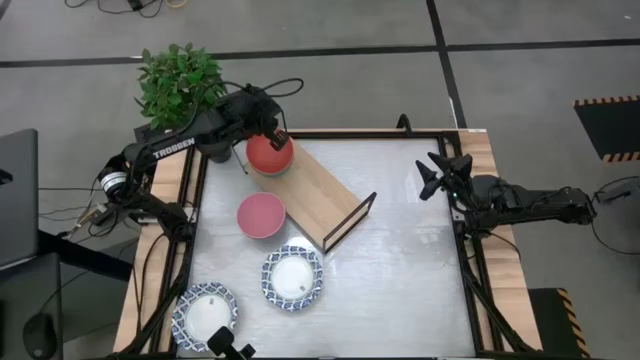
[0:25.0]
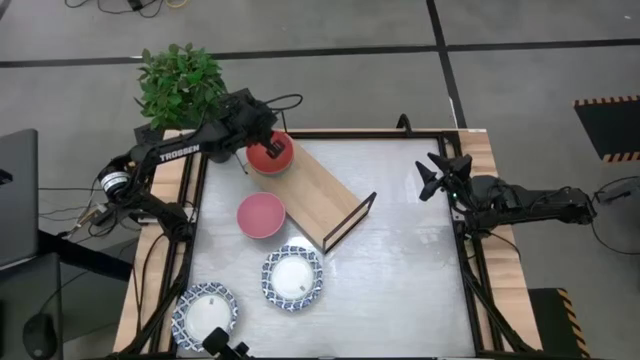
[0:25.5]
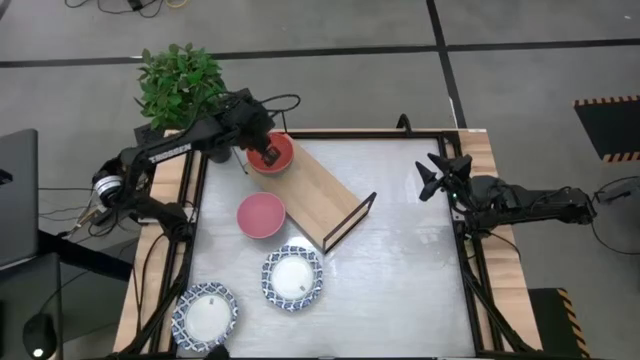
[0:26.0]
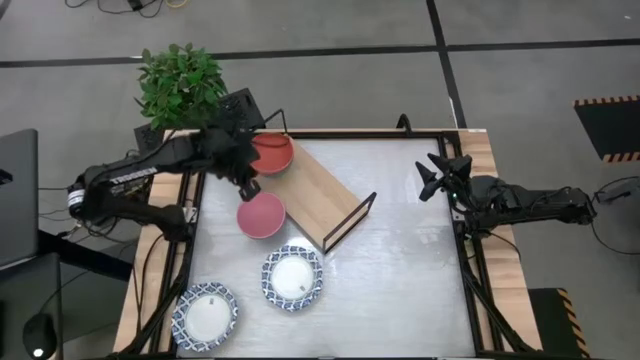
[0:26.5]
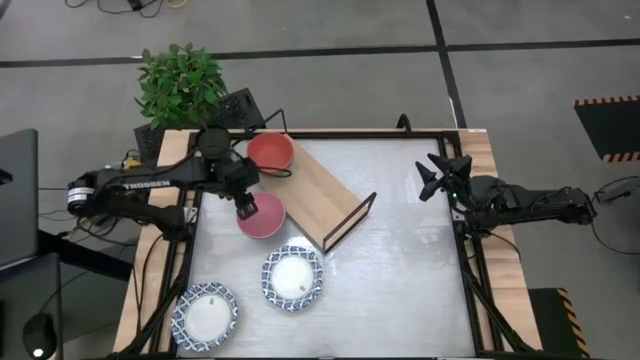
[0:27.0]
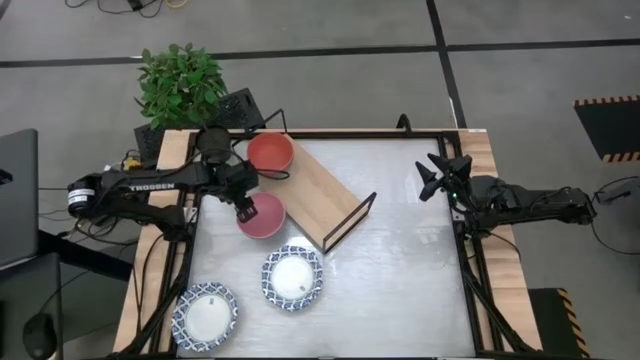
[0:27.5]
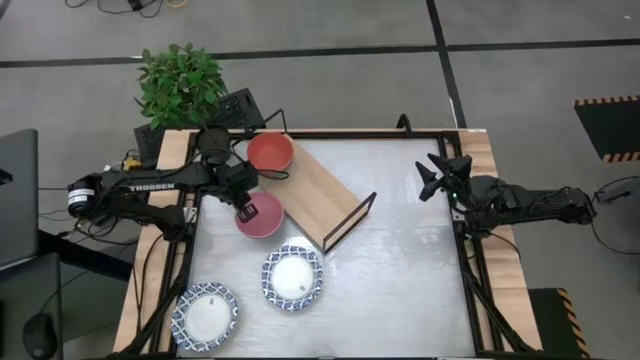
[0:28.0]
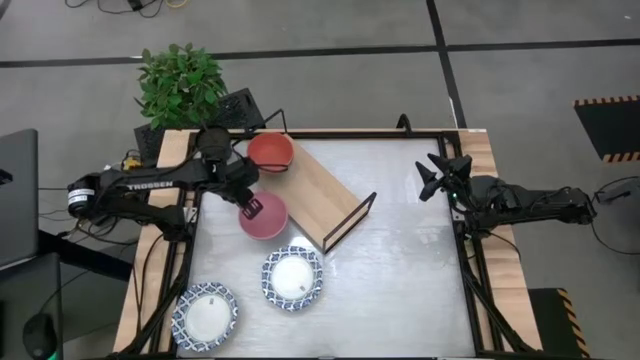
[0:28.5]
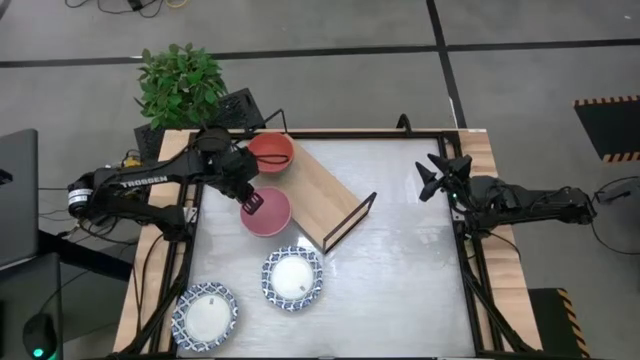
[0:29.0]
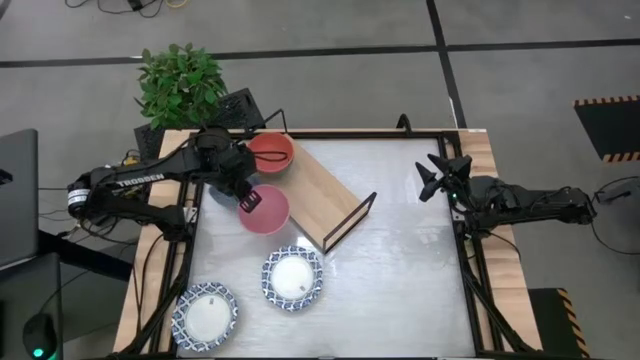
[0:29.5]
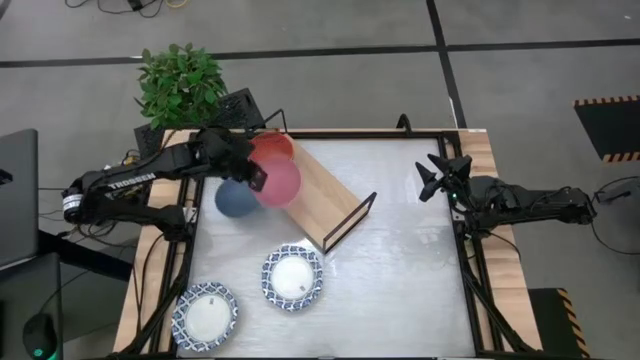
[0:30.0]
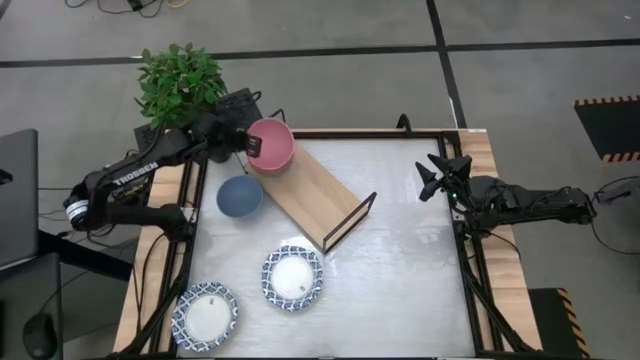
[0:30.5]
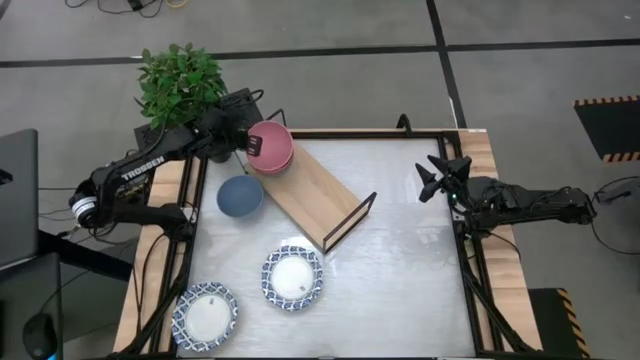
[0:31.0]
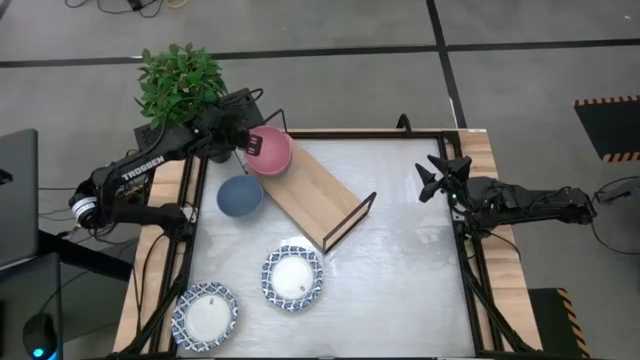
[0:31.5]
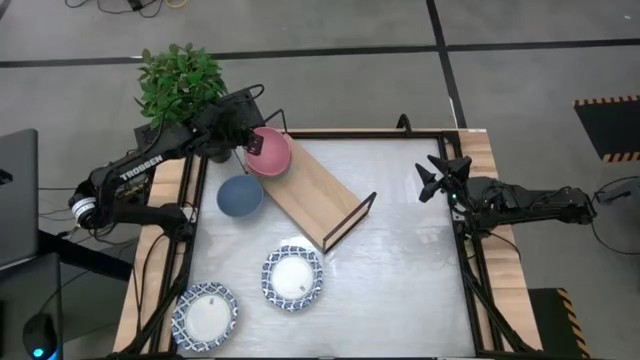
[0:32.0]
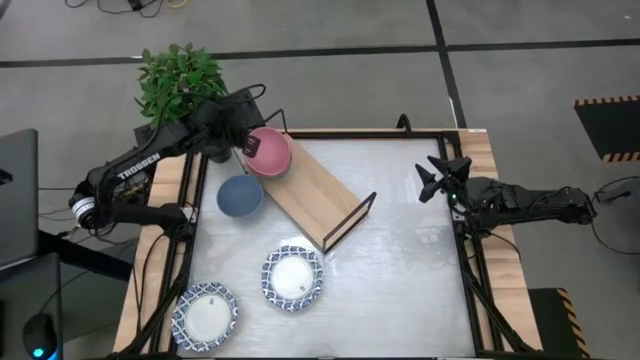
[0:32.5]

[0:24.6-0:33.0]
Task: Place and stack bowls onto a shelf
Stack the pink bowl on the orange bowl

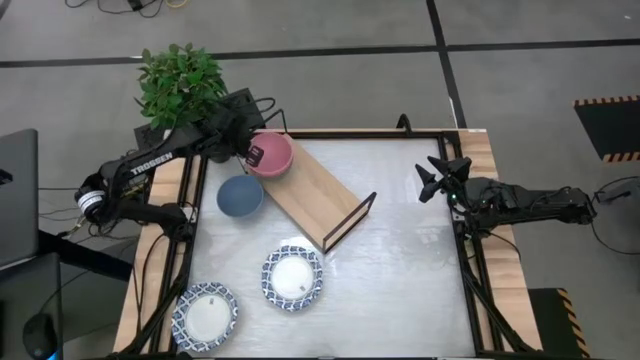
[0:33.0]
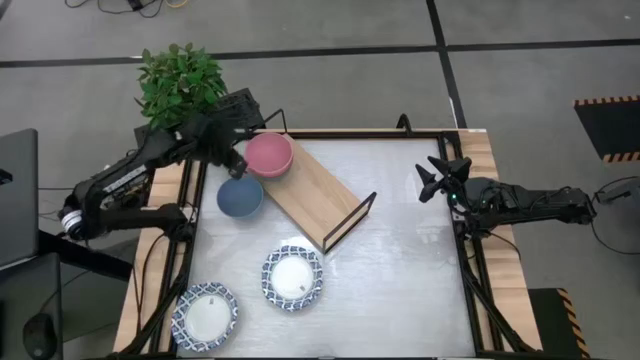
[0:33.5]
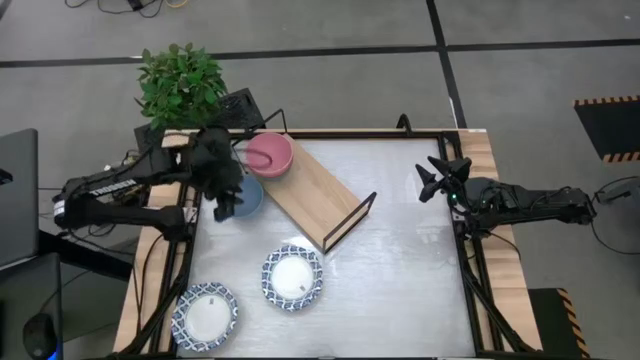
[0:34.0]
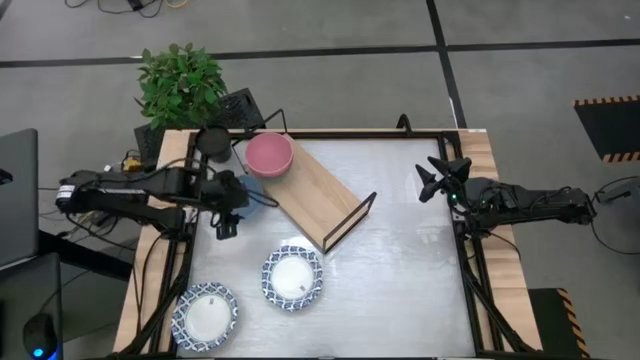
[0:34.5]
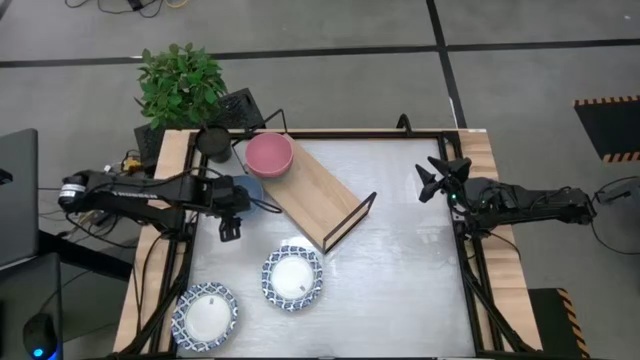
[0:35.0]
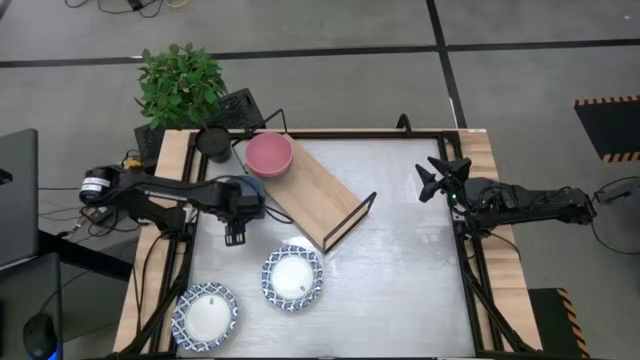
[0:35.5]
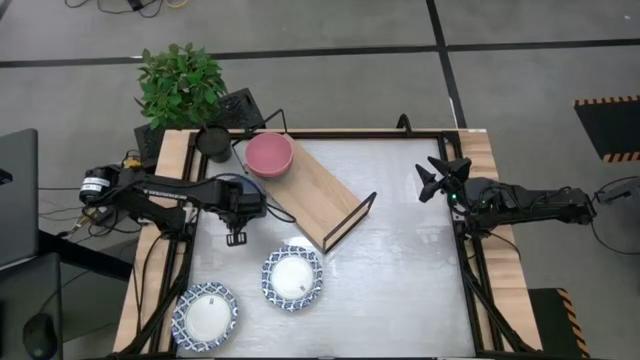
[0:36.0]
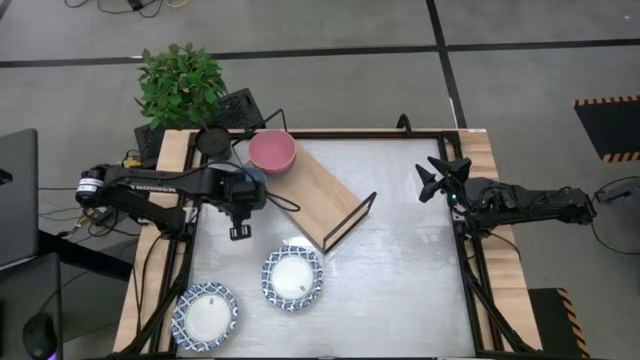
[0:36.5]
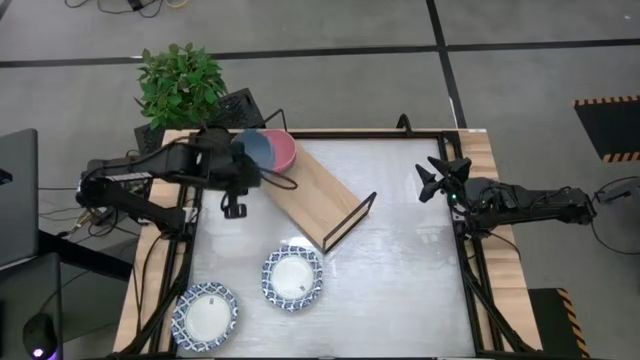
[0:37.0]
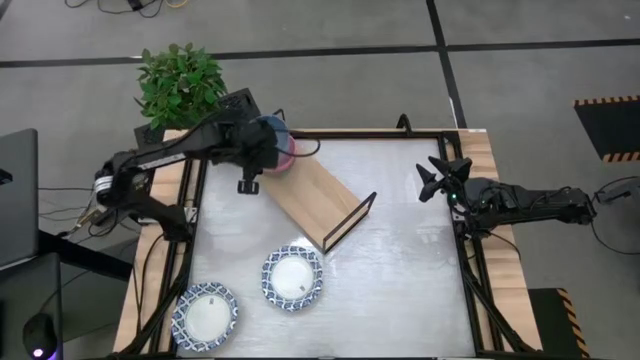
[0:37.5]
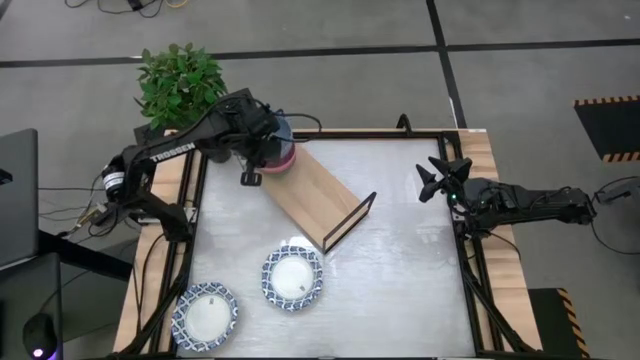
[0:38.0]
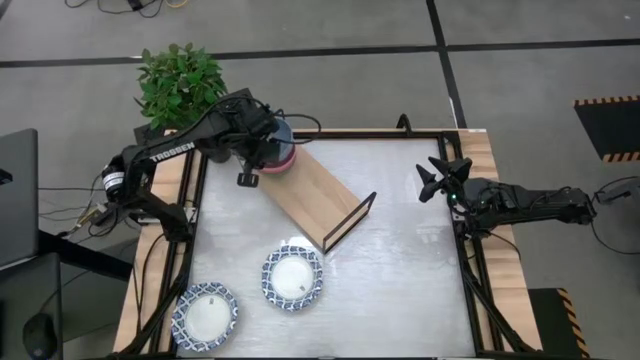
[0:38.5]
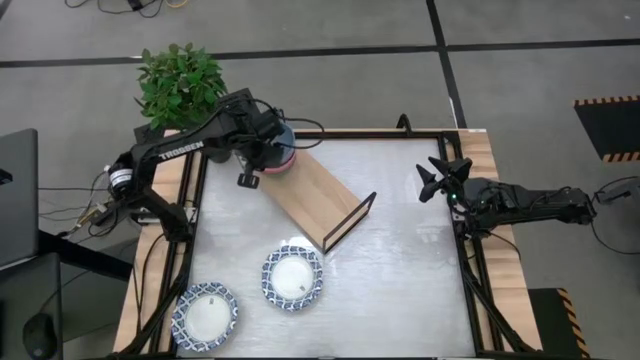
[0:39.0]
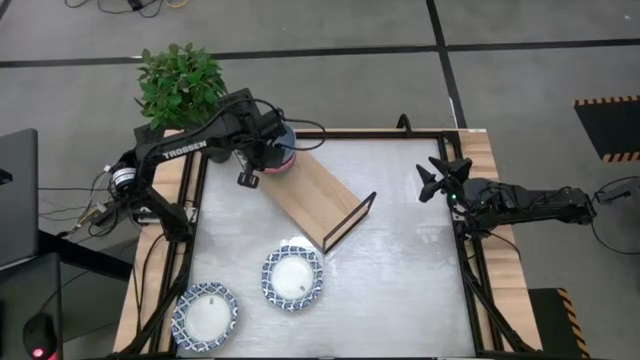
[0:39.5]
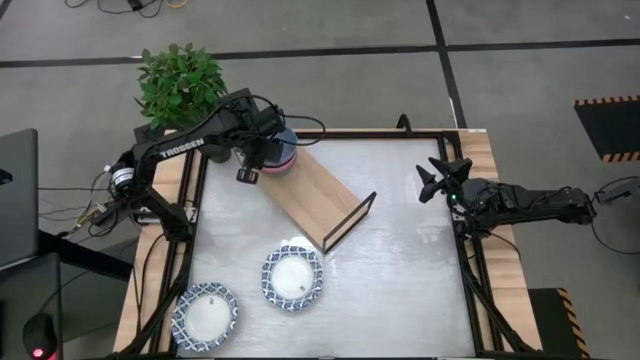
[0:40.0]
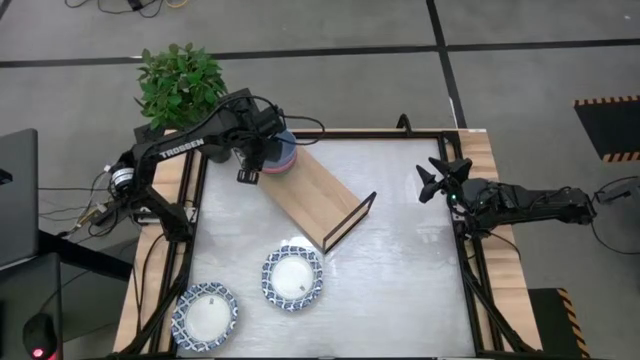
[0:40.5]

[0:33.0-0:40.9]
Stack the blue bowl on the pink bowl

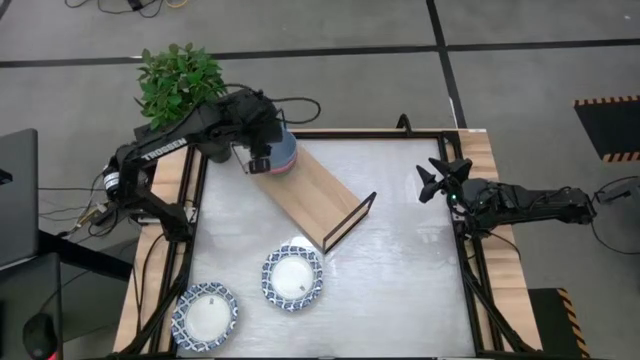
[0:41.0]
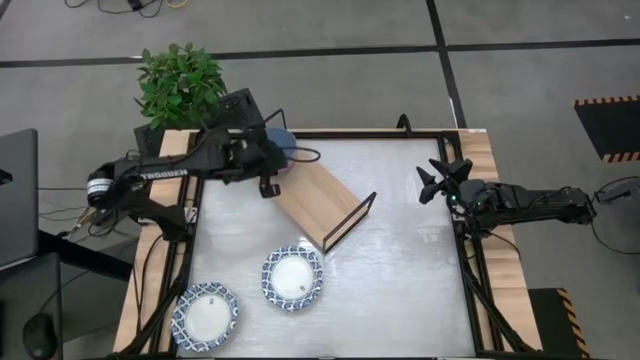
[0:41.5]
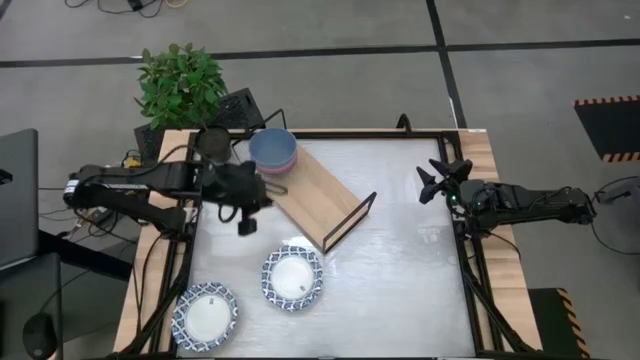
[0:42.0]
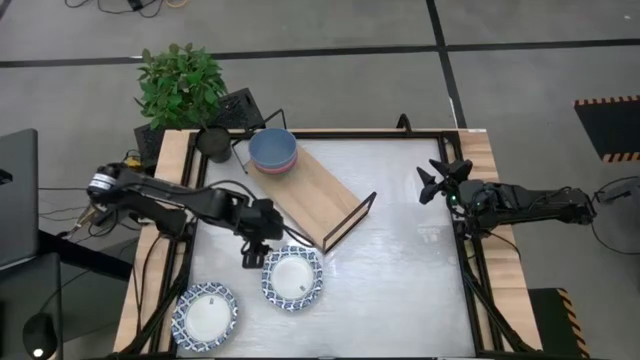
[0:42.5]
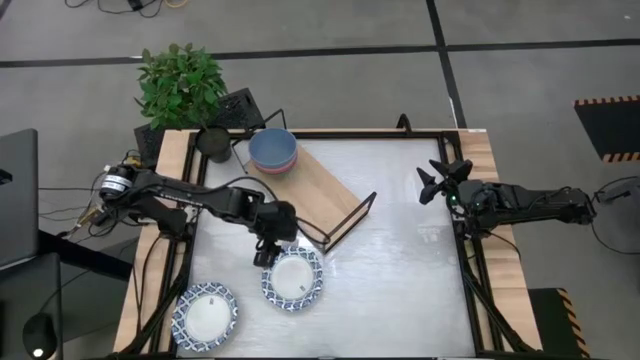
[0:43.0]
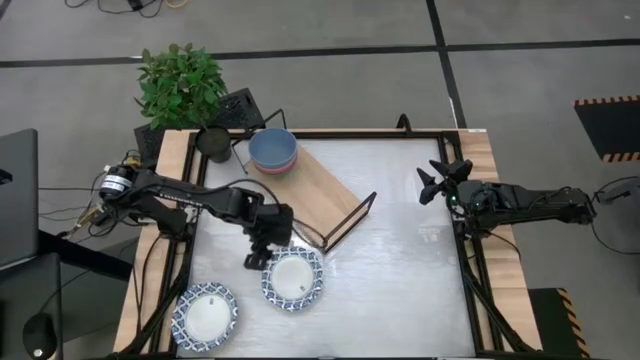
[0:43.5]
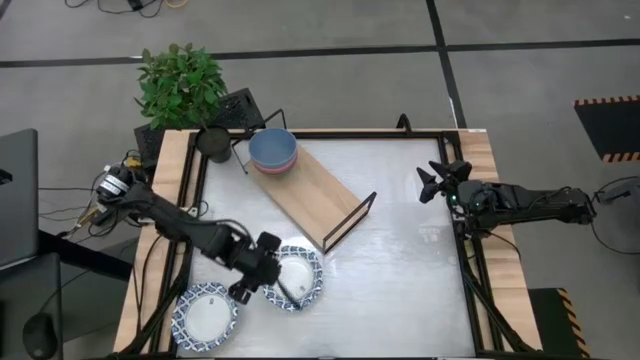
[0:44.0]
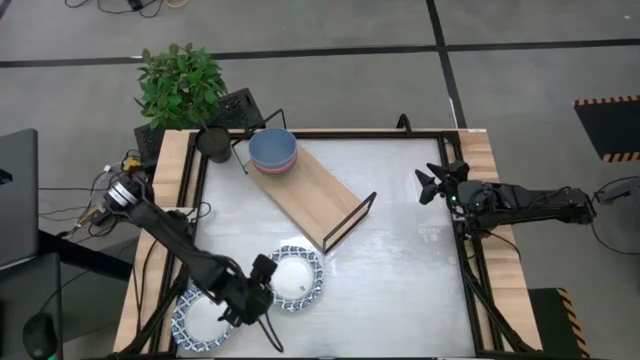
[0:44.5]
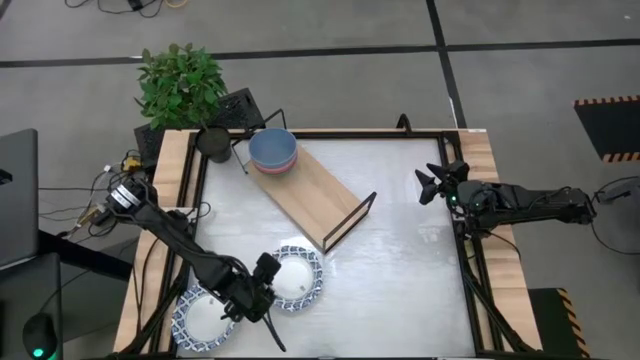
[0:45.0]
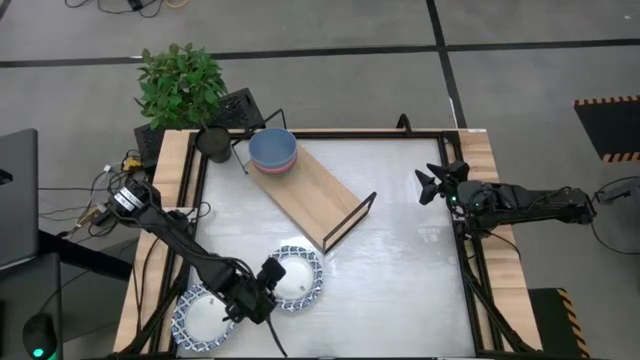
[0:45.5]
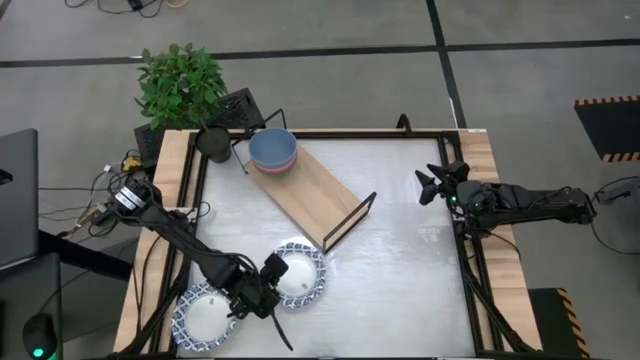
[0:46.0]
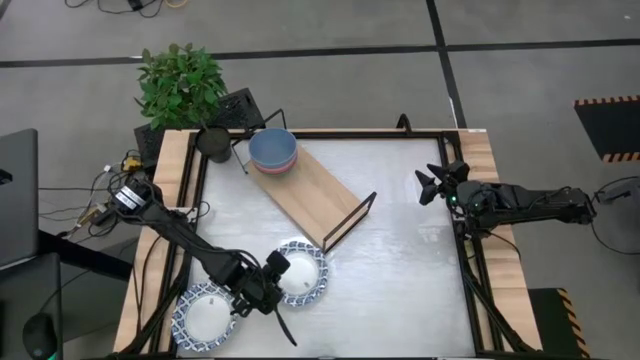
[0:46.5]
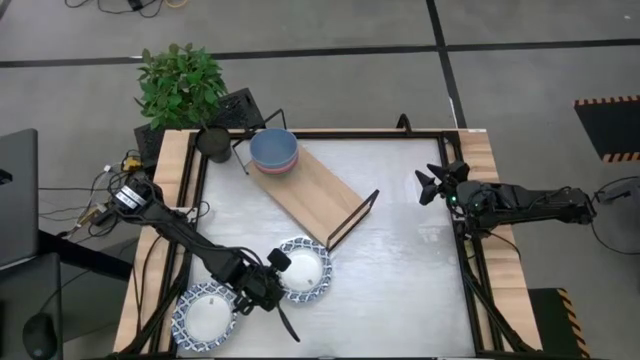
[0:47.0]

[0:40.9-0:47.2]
Put the top right patterned blue bowl on the shelf
